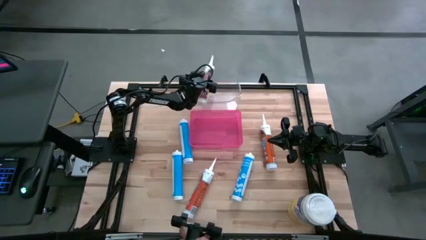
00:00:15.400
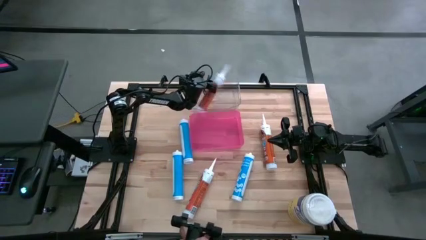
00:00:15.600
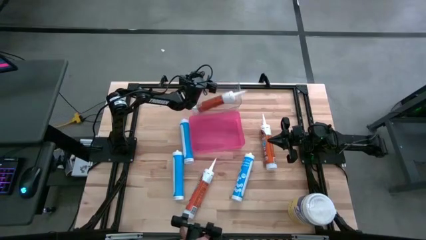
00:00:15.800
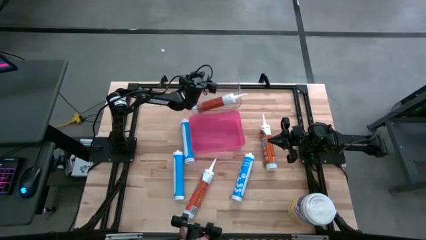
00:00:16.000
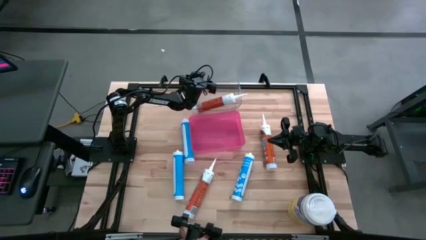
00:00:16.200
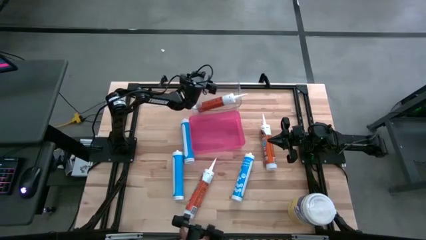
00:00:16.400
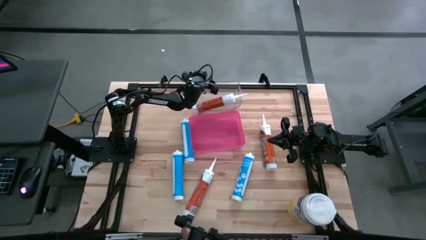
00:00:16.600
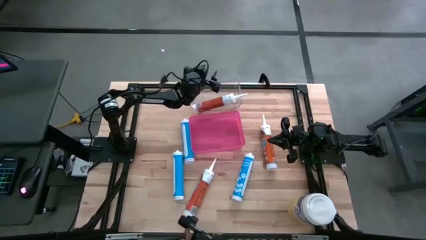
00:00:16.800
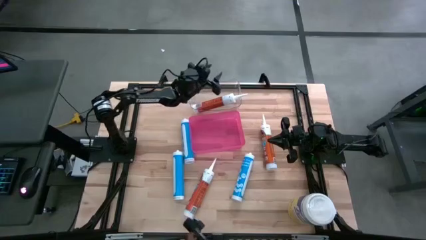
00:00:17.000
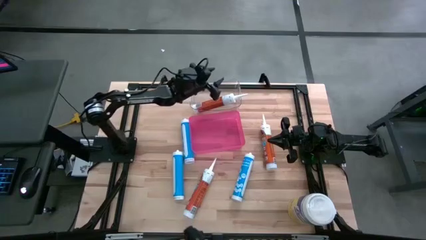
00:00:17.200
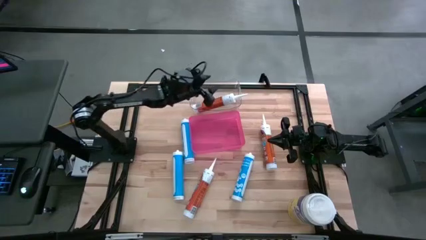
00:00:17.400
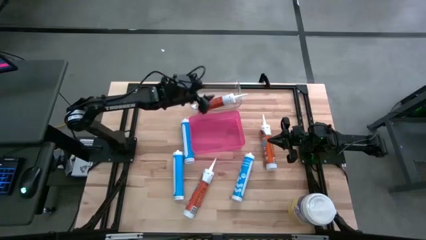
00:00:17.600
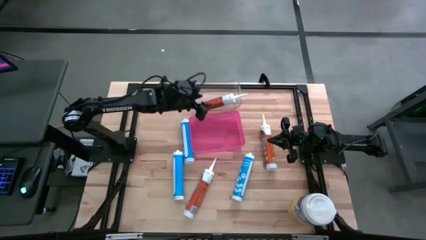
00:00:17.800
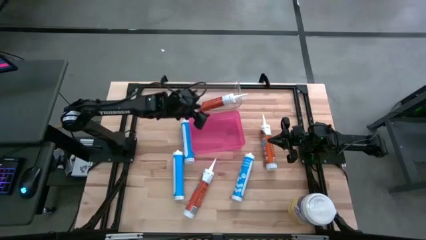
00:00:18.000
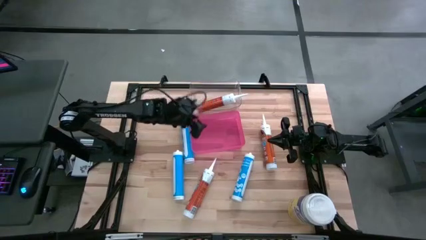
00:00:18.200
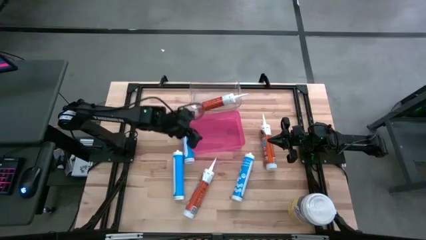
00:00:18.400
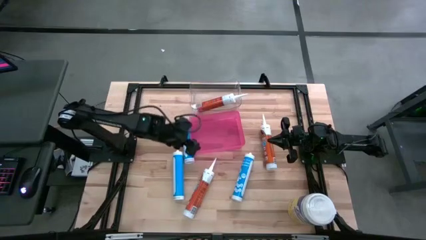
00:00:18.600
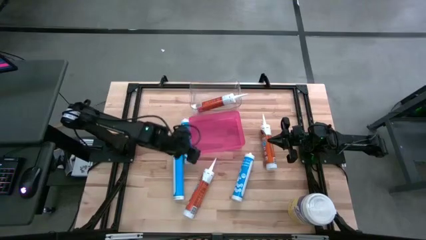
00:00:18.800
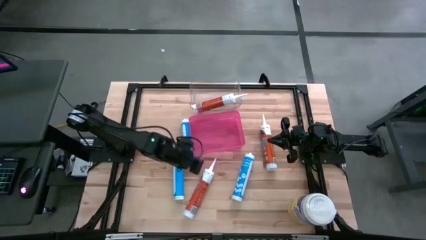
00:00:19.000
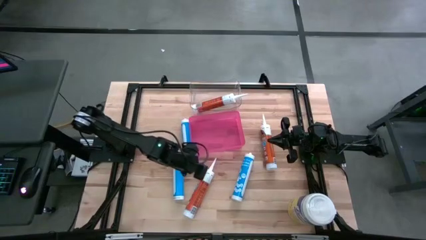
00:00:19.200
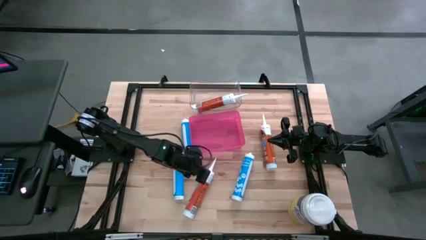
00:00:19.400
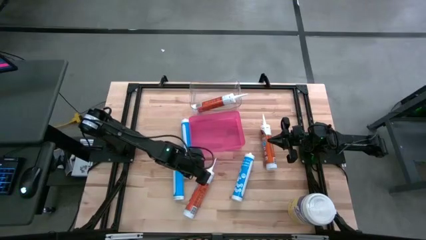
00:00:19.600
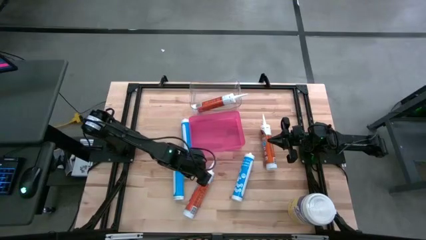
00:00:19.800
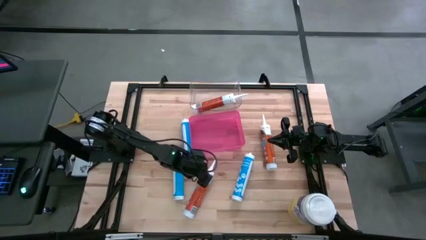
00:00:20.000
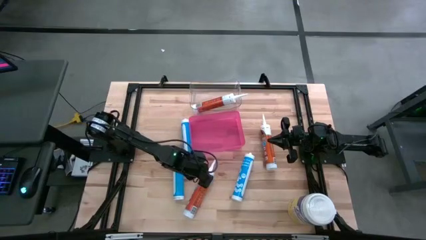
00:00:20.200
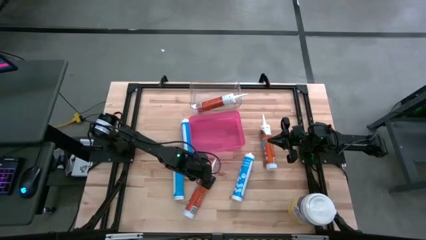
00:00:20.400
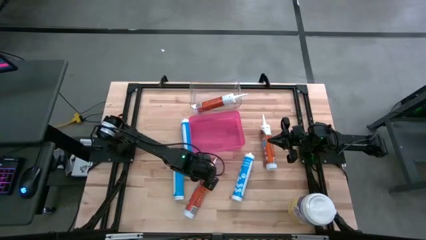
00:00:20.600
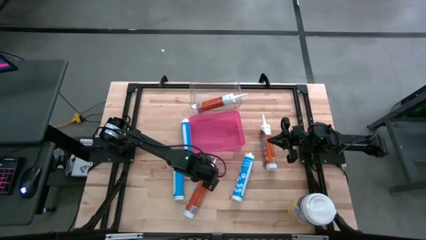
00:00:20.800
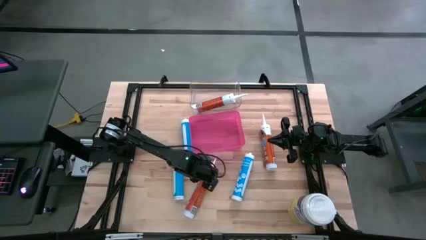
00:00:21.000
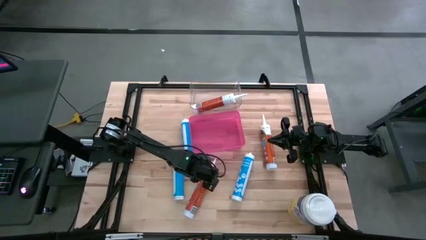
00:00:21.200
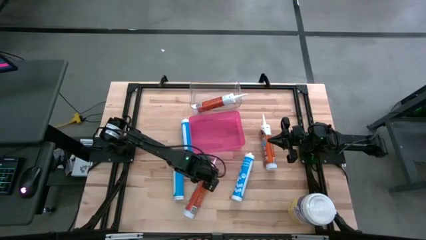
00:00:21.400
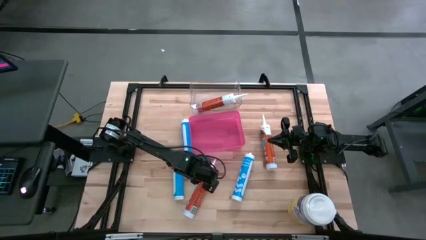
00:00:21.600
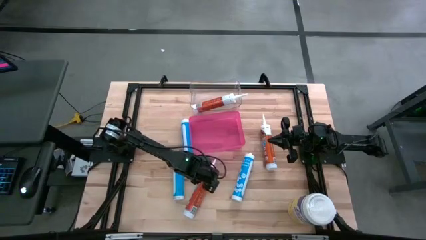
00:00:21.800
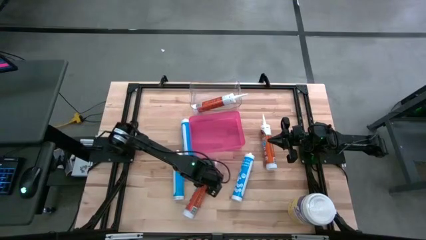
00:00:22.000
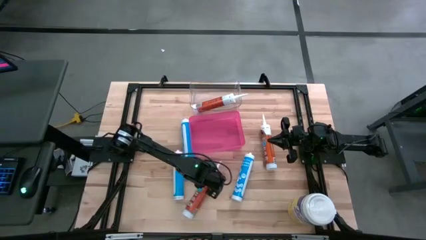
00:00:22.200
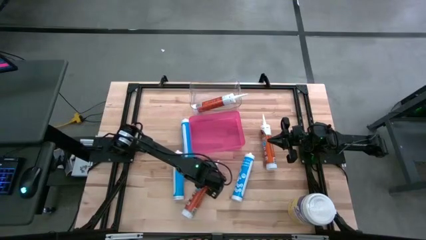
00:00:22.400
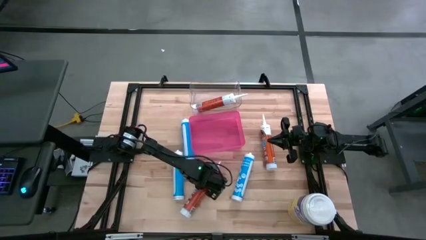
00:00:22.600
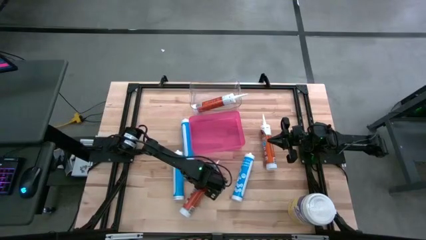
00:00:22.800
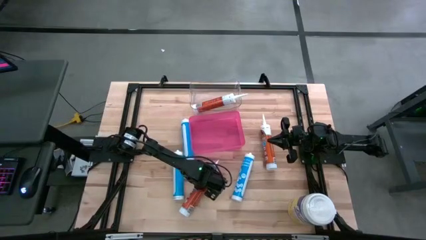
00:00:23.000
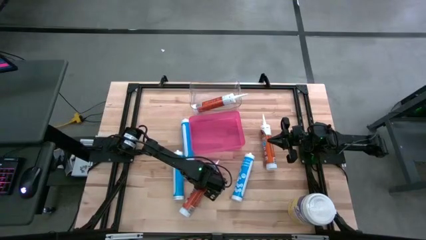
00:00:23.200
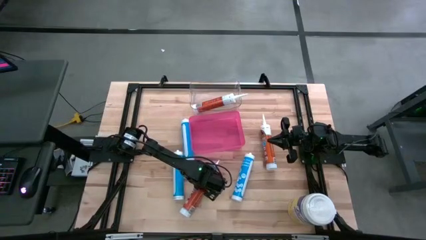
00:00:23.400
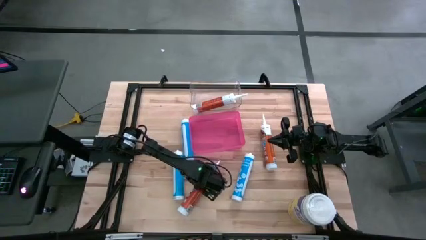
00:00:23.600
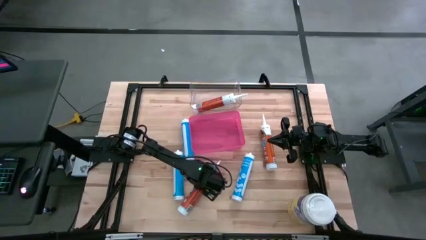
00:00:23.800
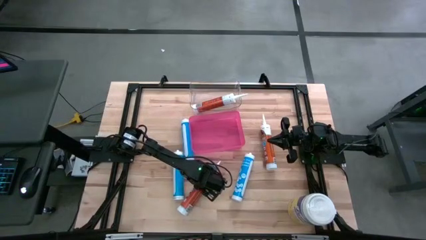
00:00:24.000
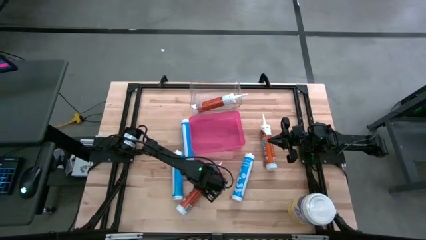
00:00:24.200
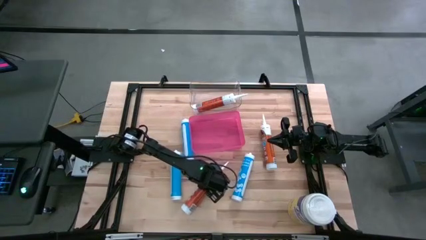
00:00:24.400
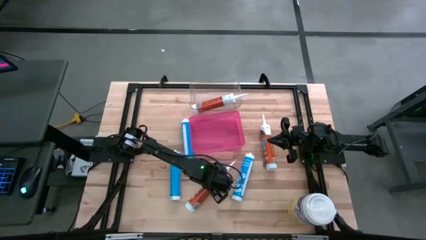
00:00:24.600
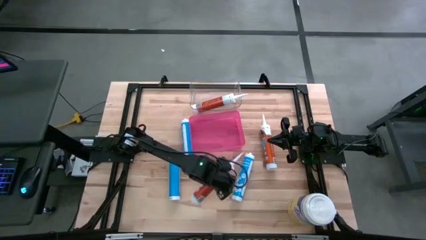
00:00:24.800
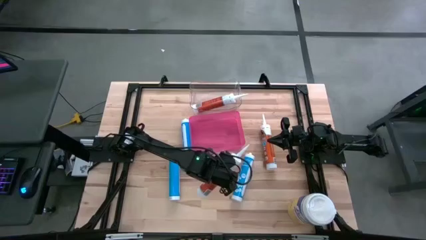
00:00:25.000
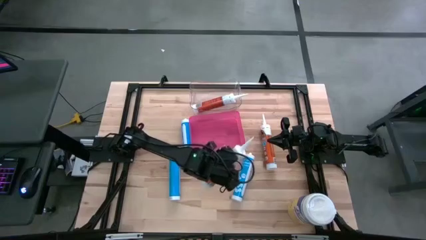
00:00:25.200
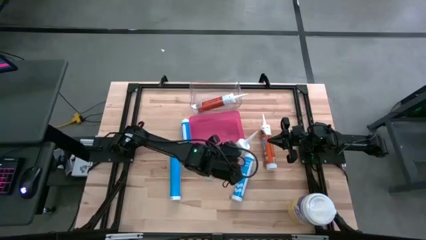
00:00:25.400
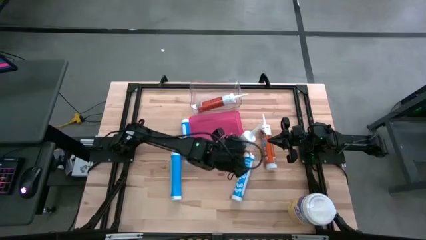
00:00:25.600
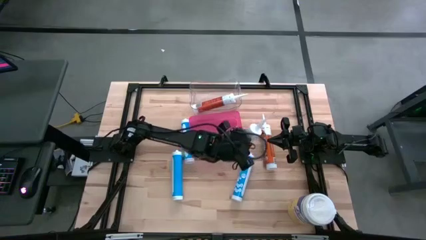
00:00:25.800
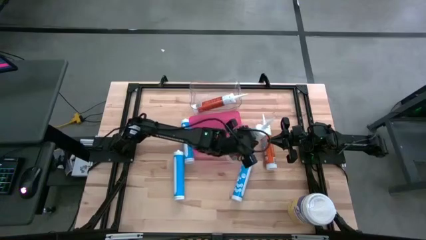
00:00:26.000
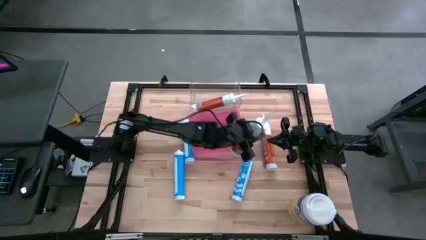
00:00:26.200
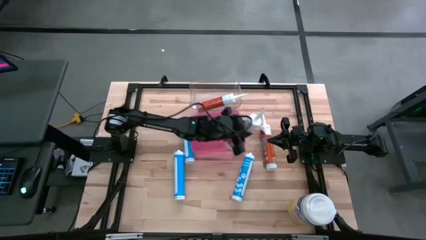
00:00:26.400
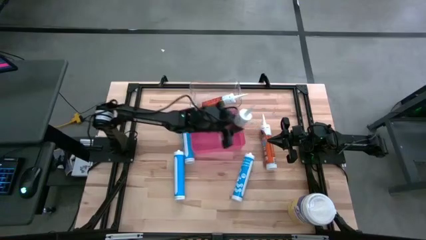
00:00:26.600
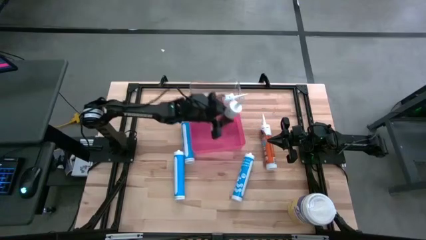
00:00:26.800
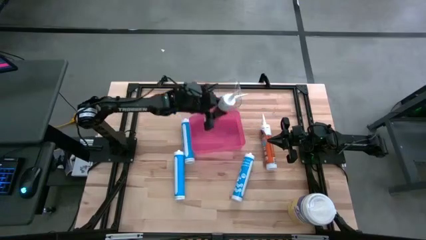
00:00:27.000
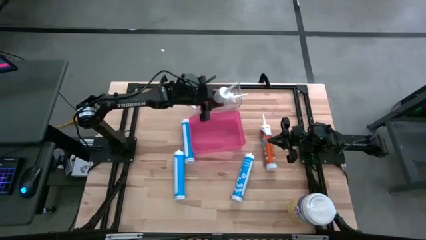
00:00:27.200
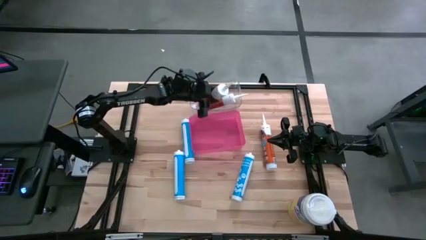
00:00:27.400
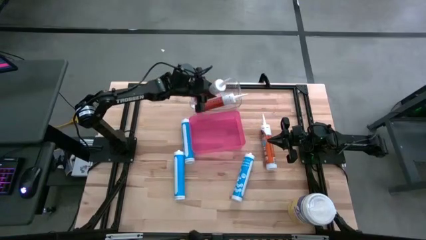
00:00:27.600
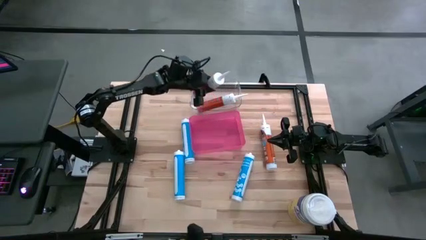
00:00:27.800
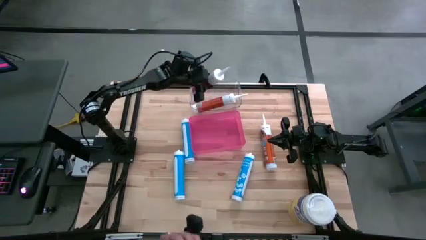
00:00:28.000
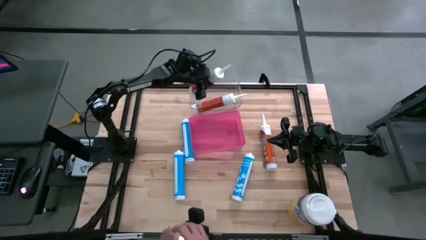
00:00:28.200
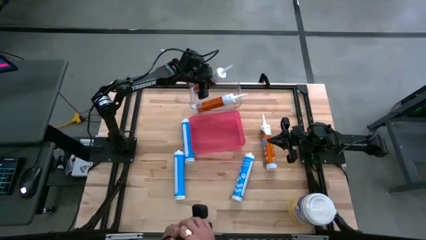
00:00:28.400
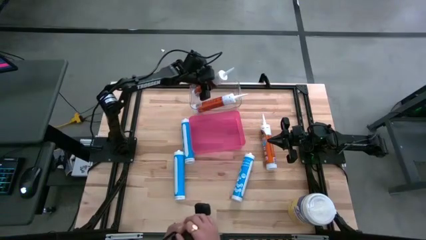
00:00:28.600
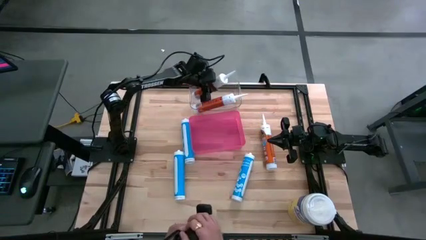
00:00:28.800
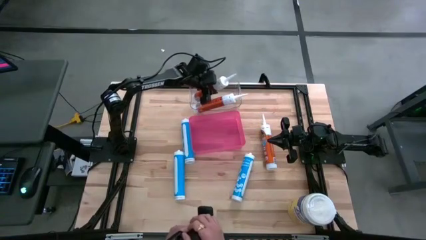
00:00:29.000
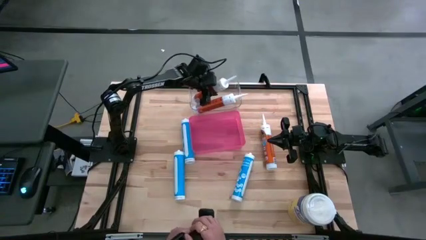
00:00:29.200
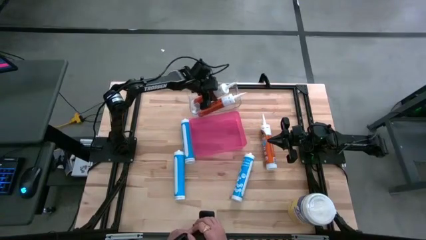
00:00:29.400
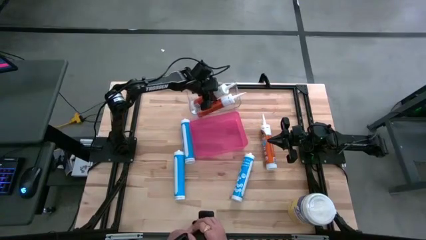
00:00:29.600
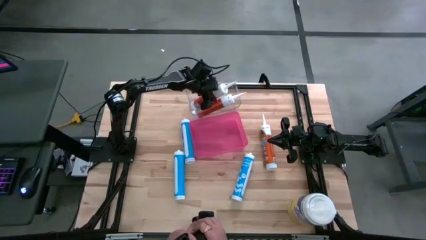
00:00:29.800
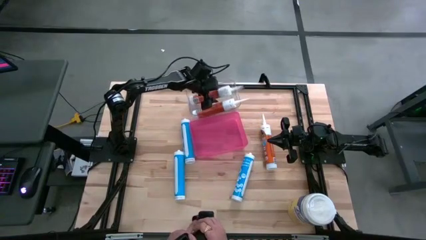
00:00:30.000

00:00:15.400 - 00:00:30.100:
Task: Pick & place silicon tubes, Sealant and Lysol wipes
Put the bottom orange sealant into the transparent bin
